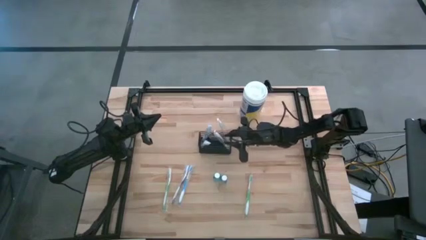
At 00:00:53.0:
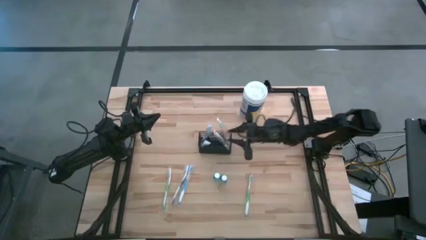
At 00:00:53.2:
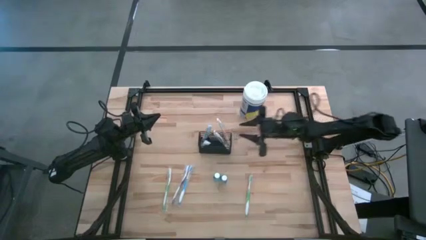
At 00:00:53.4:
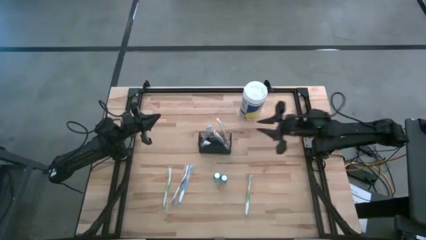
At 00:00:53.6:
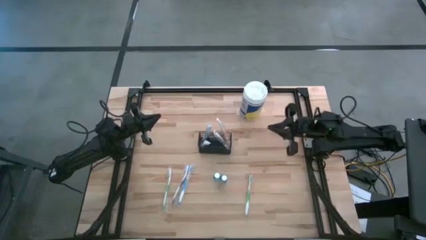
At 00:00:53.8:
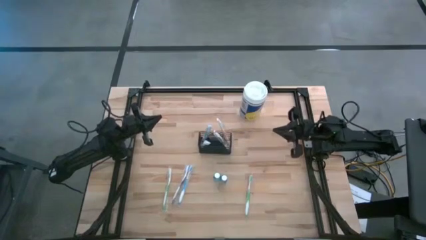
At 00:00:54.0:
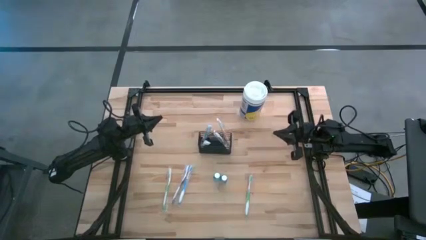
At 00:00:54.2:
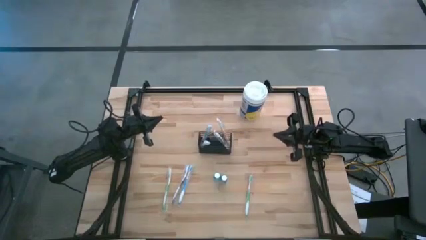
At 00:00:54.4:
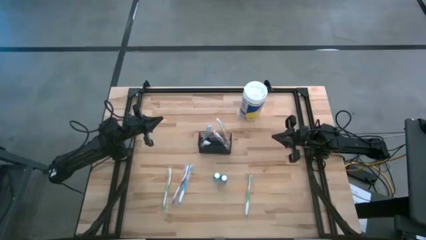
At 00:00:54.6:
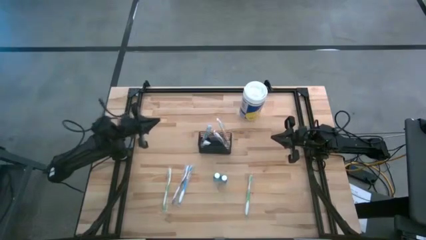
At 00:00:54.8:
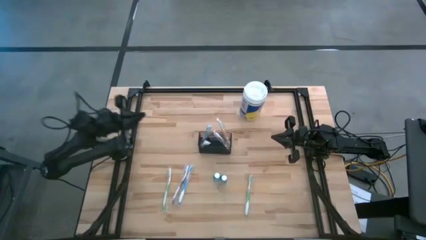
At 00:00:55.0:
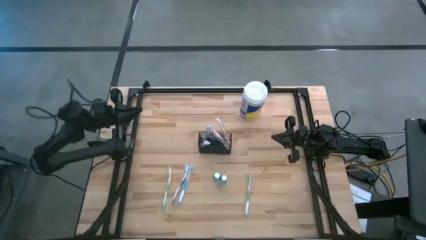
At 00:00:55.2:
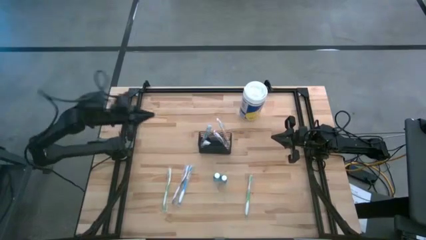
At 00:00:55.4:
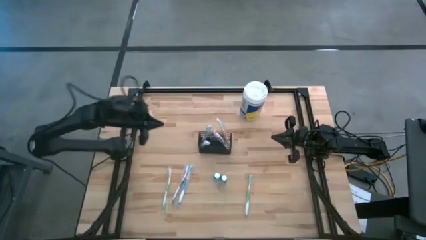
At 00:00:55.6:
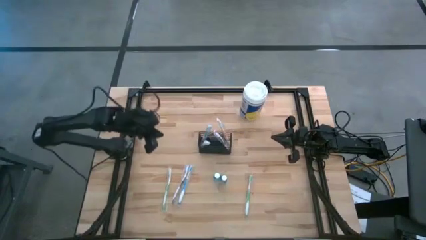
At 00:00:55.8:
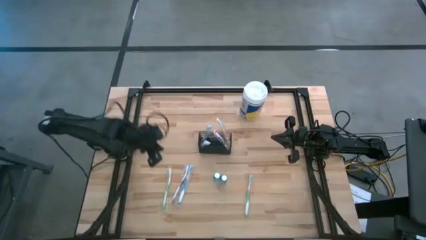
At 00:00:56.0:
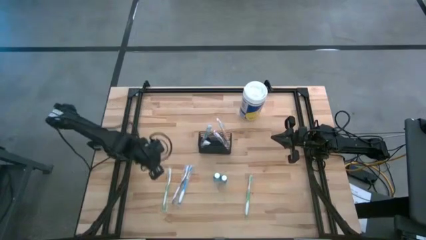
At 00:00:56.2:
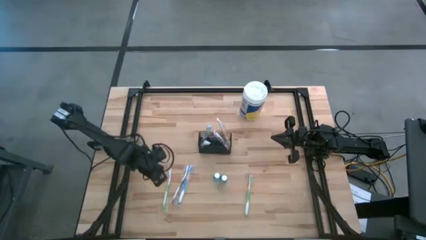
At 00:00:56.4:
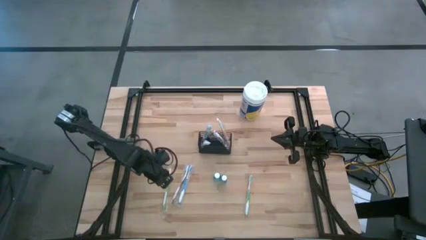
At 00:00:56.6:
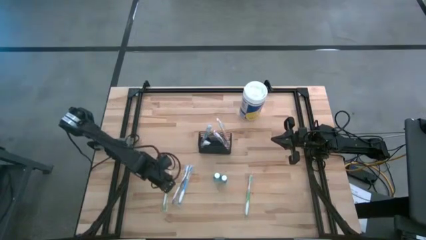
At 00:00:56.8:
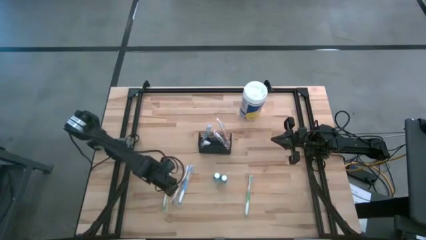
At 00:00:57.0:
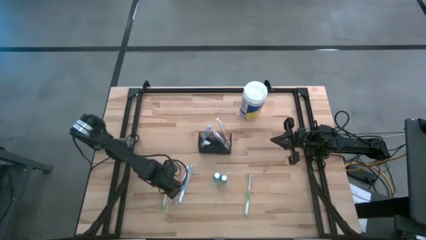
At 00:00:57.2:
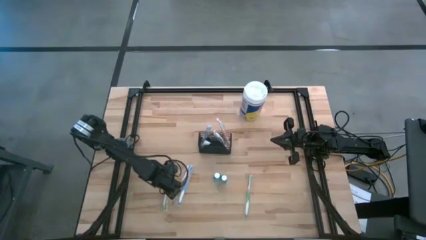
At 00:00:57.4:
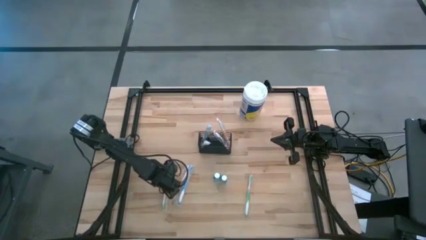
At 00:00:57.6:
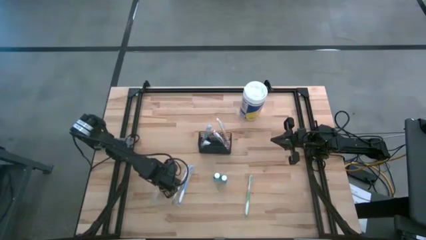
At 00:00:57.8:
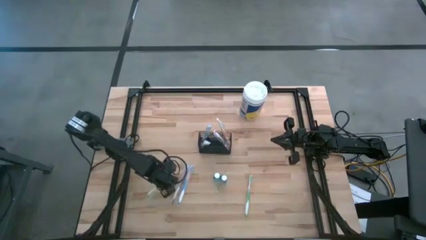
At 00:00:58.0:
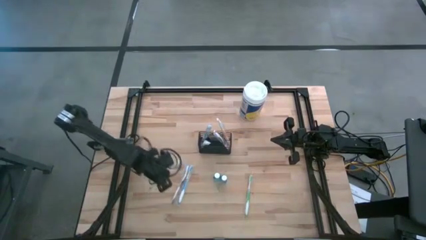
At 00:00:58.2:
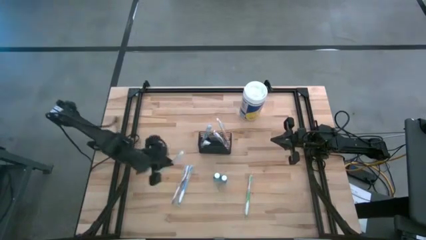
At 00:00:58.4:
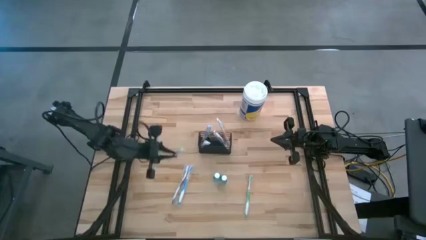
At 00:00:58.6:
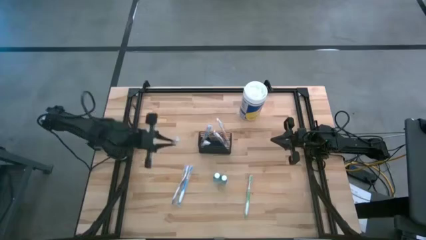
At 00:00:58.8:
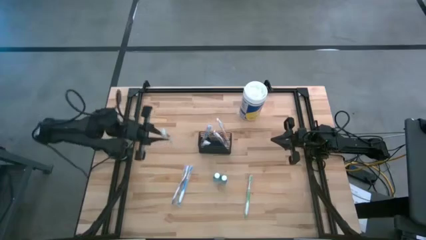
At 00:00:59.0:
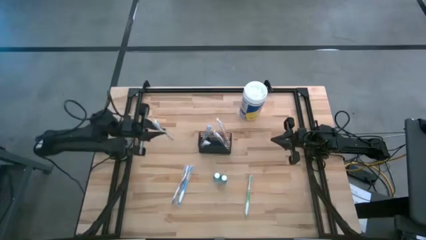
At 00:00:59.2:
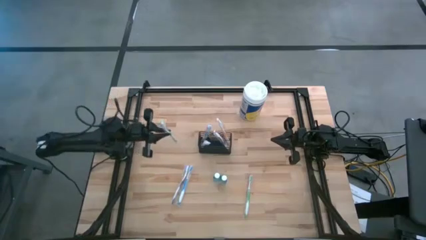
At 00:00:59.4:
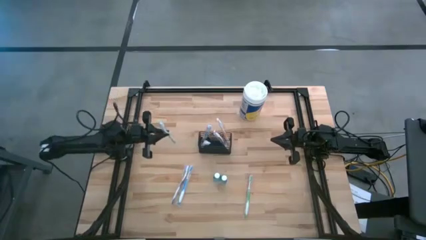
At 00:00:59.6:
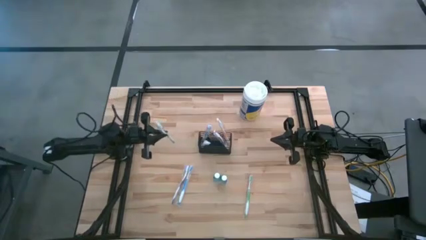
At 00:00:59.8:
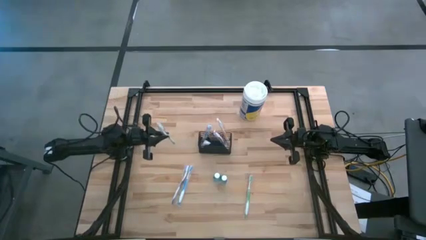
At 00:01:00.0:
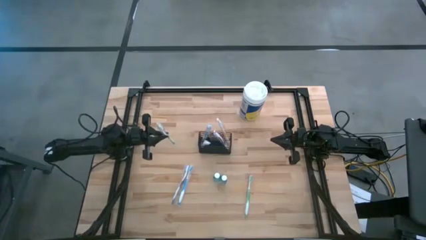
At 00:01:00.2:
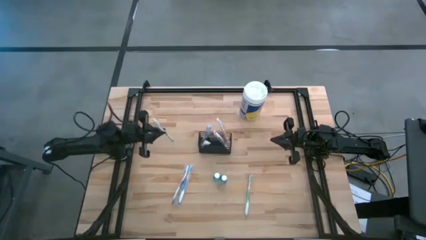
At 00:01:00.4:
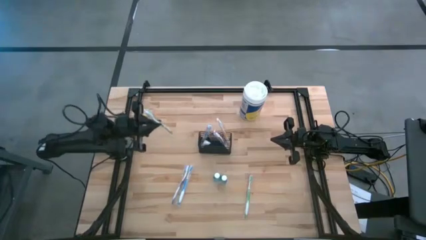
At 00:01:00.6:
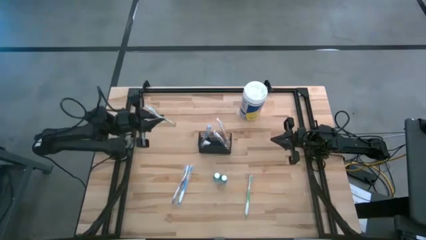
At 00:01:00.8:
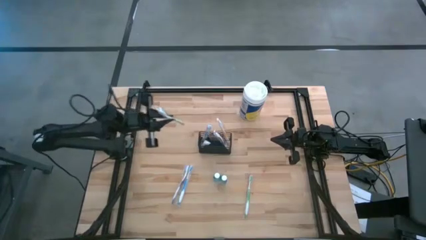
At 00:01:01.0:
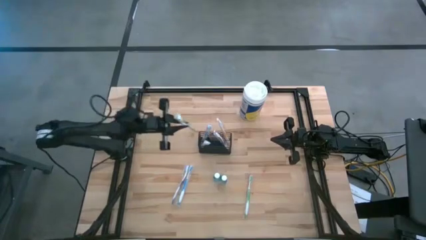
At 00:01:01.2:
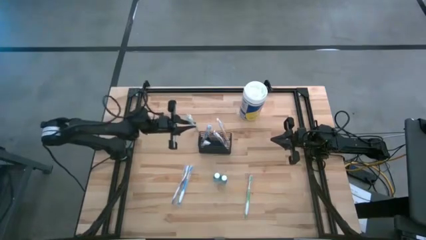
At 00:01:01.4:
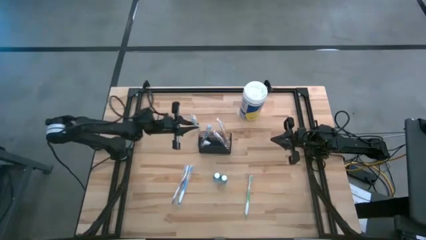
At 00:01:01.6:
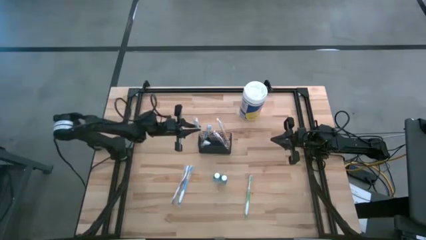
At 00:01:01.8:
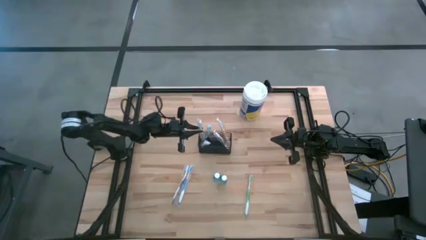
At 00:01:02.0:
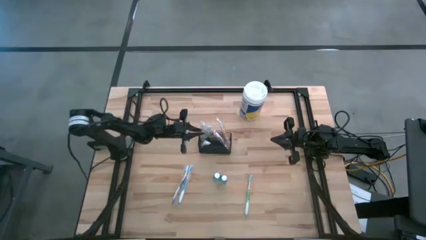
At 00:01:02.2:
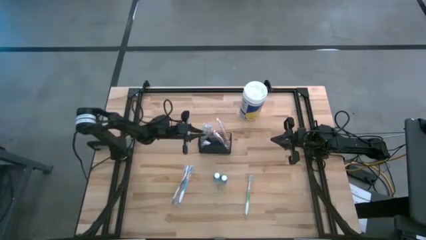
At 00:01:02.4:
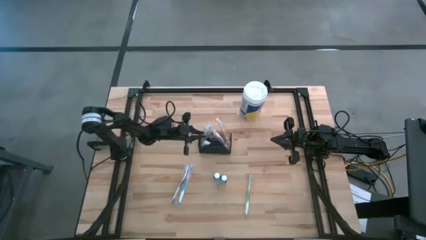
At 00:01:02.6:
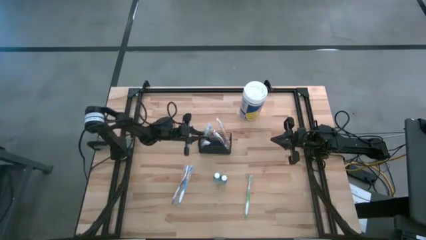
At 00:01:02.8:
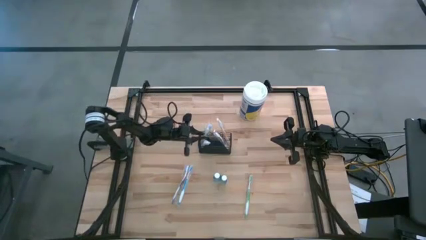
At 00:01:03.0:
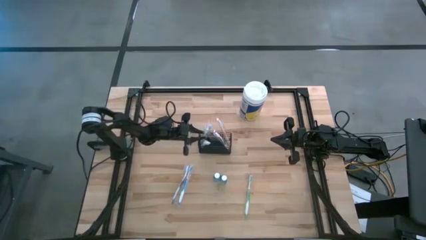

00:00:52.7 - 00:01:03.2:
Task: Pick & Place toothbrushing station
Put the green toothbrush into the black wire organizer

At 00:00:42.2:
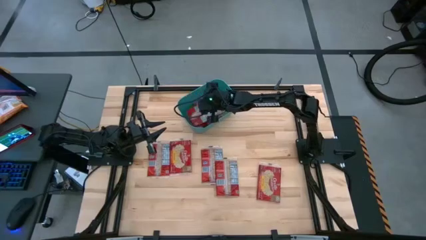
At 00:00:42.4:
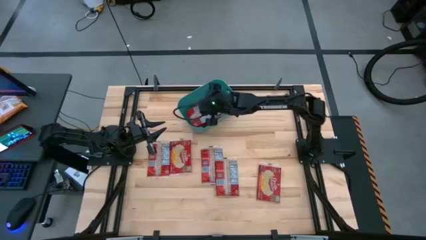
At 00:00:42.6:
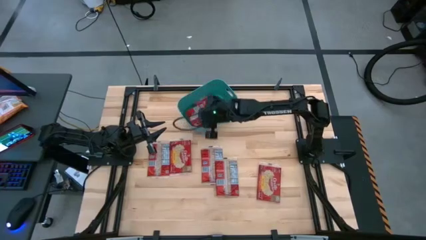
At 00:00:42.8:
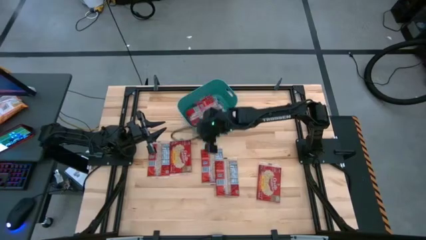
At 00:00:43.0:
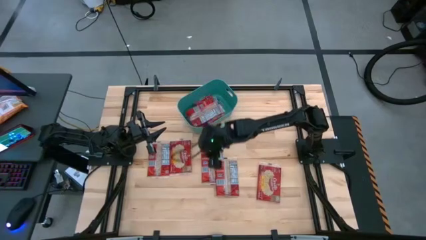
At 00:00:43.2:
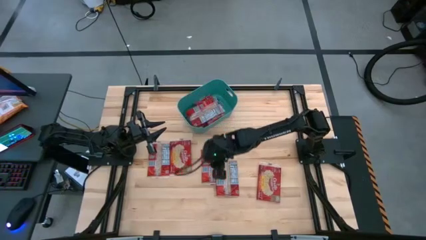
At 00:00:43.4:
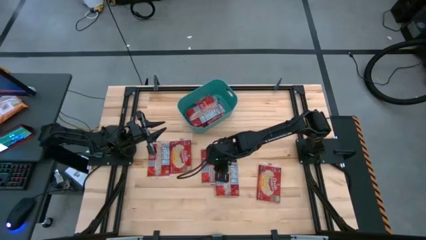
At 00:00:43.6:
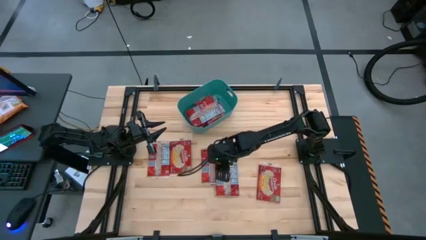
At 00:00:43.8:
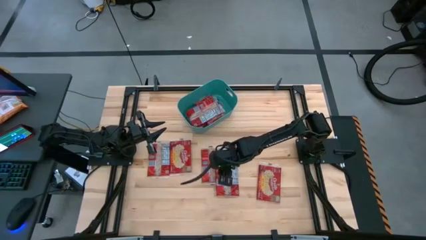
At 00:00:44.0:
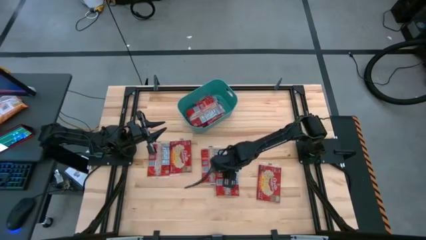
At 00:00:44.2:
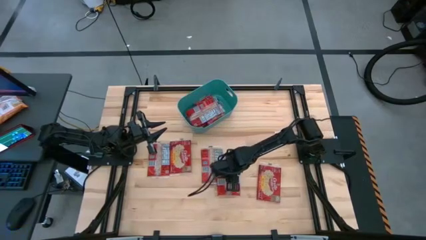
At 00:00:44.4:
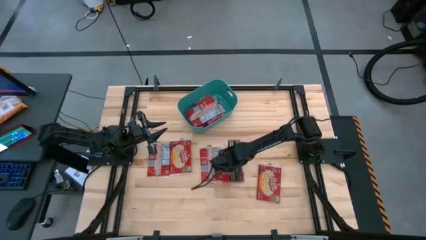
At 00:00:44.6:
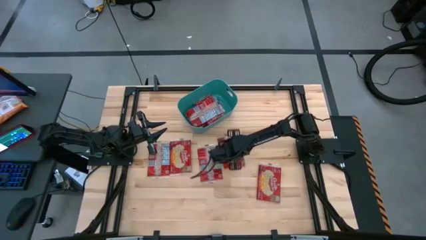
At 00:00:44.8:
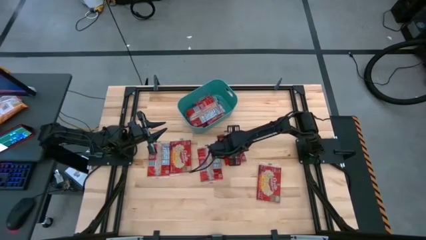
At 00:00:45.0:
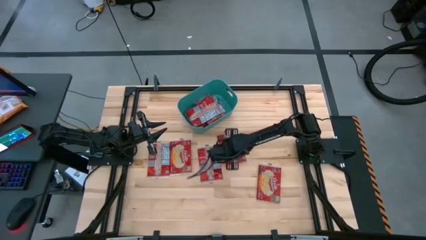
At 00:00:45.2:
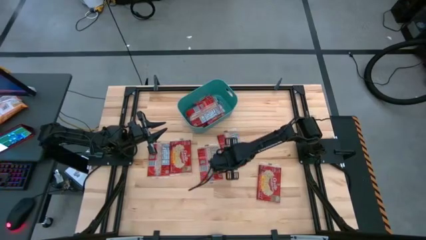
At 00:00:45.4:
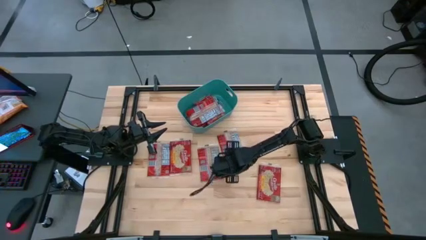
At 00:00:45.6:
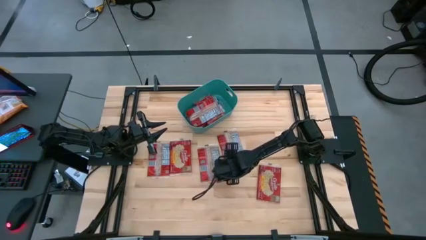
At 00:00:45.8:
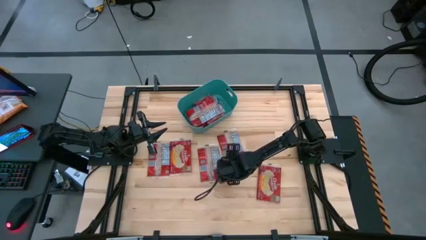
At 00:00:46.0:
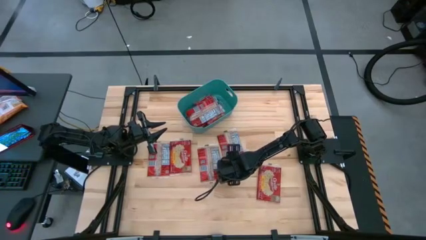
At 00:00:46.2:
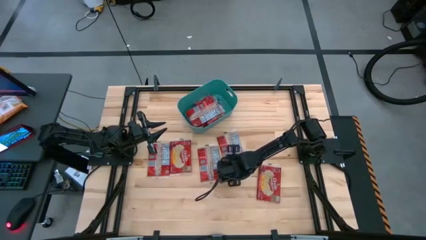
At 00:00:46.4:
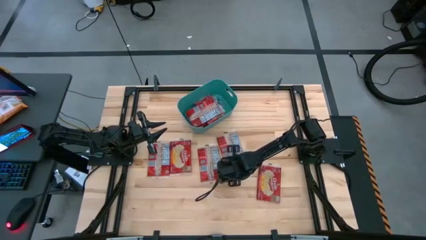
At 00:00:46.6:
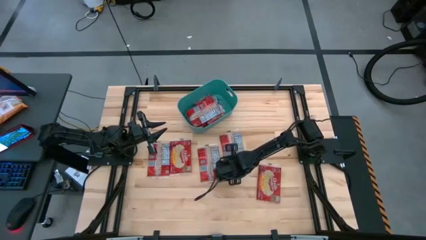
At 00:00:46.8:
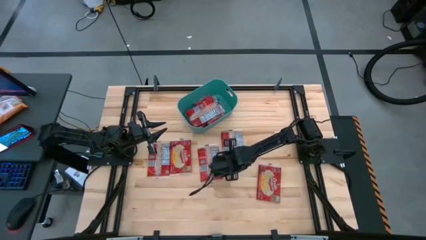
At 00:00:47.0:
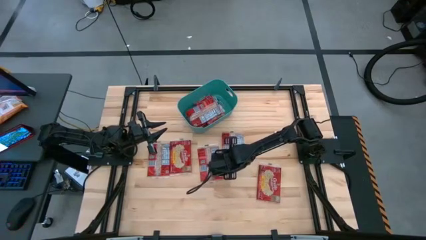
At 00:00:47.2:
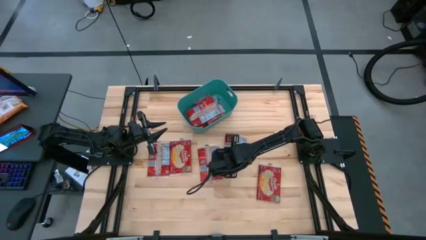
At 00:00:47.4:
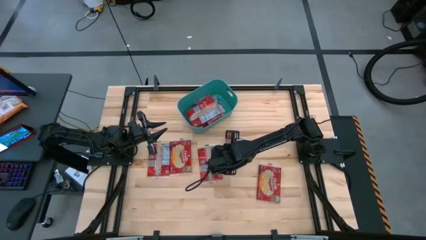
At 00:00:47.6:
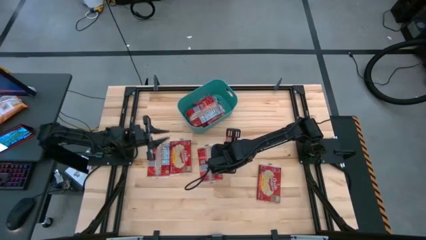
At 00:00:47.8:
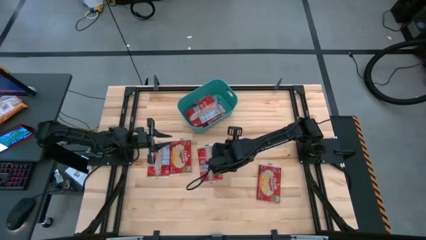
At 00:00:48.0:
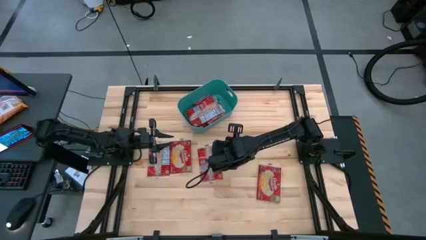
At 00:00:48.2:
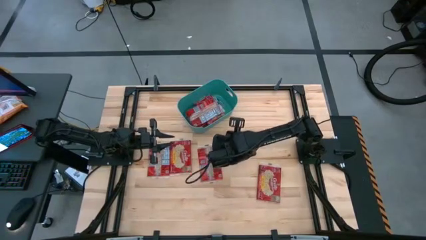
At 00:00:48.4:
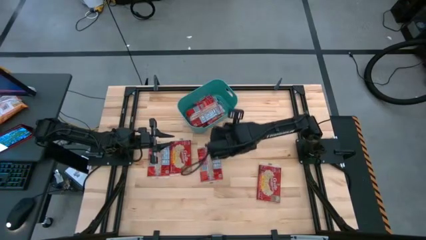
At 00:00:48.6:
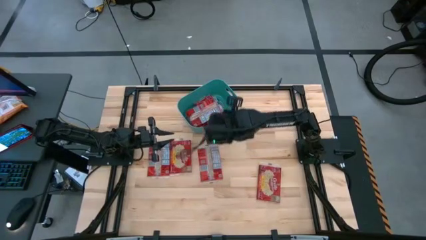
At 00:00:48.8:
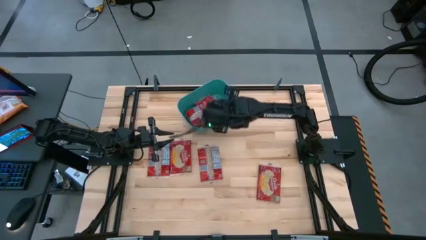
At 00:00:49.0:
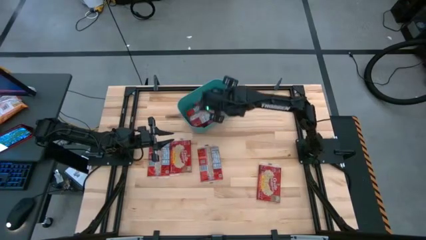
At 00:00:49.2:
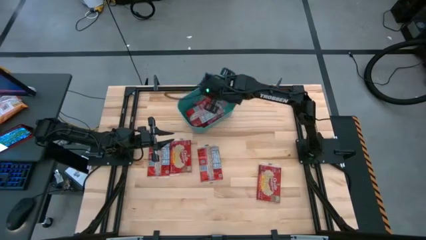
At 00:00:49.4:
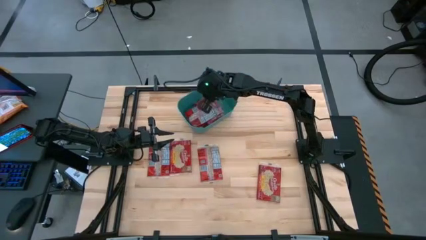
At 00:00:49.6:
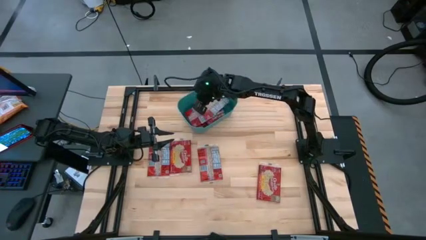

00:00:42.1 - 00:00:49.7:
Task: Sort popcorn bags into baskets
Put the popcorn bag into the blue bin
